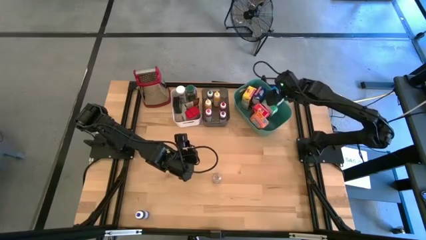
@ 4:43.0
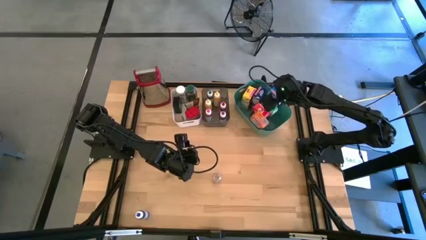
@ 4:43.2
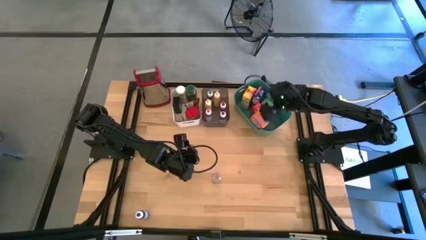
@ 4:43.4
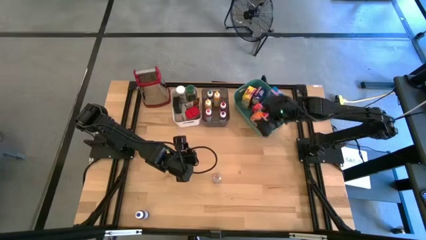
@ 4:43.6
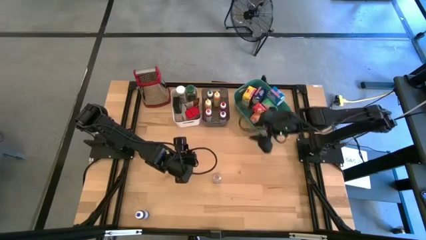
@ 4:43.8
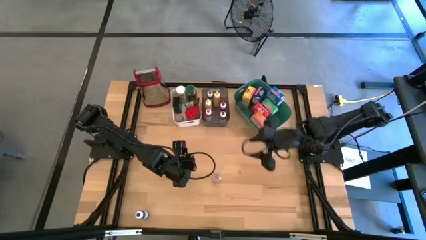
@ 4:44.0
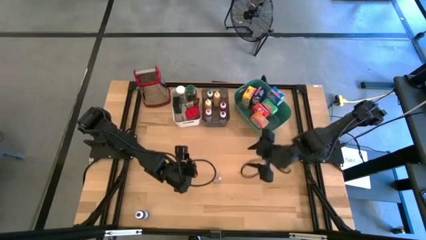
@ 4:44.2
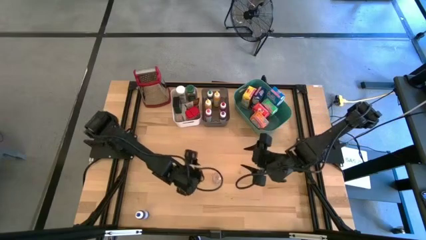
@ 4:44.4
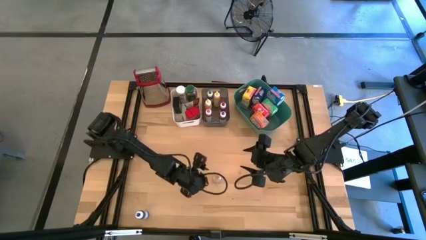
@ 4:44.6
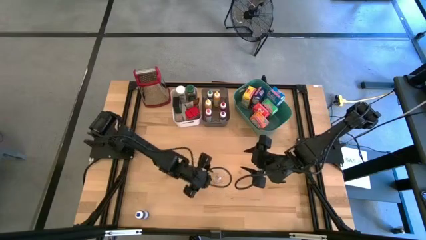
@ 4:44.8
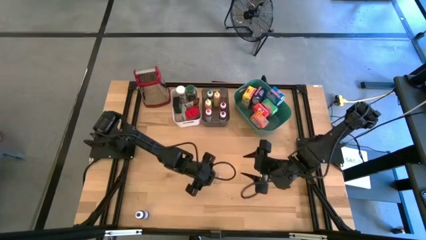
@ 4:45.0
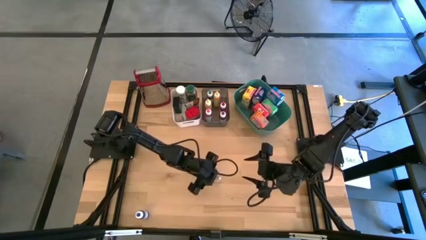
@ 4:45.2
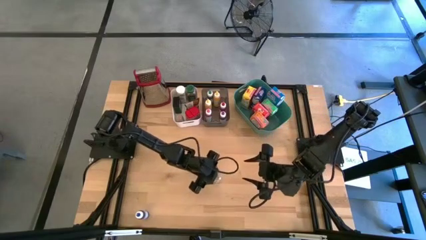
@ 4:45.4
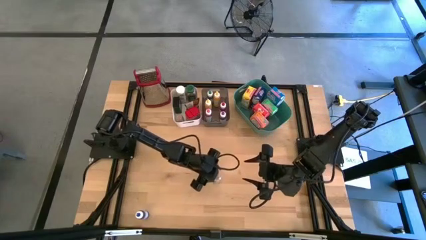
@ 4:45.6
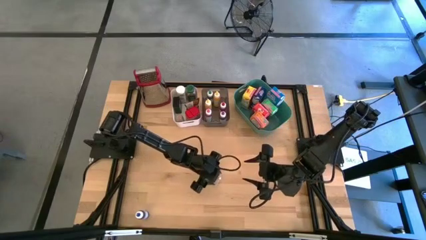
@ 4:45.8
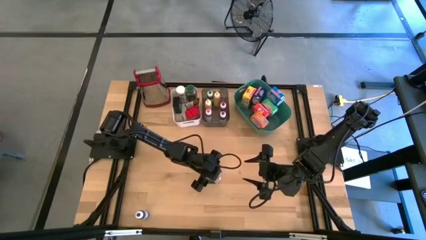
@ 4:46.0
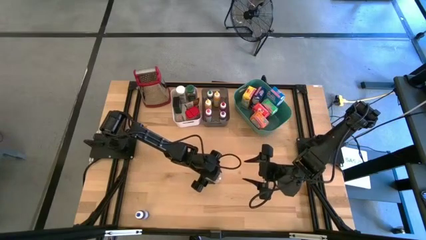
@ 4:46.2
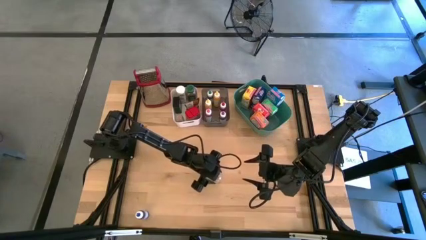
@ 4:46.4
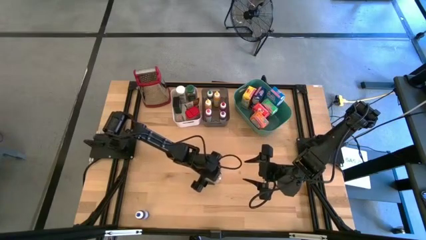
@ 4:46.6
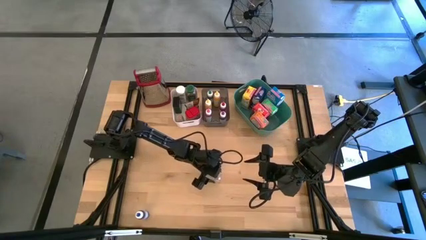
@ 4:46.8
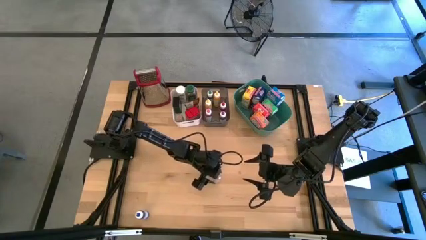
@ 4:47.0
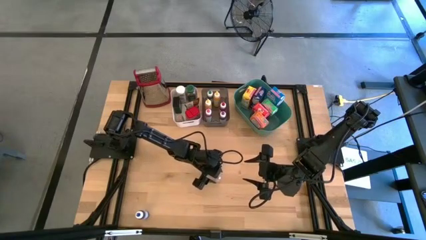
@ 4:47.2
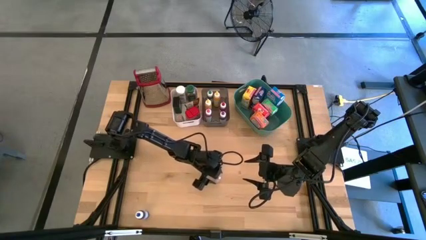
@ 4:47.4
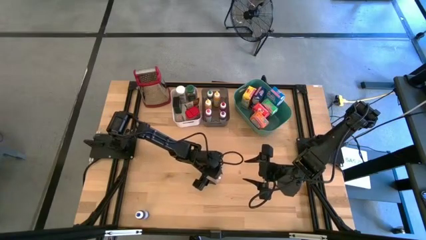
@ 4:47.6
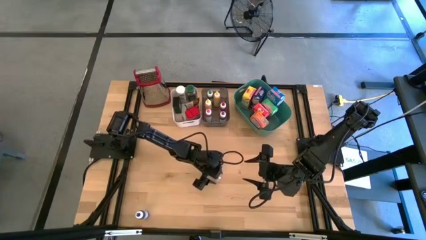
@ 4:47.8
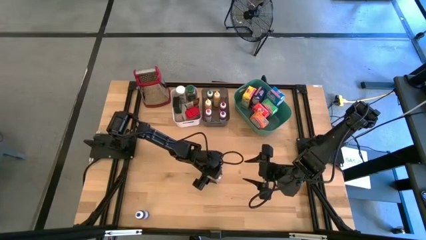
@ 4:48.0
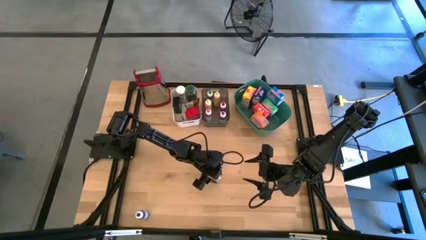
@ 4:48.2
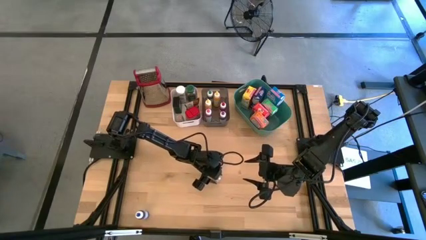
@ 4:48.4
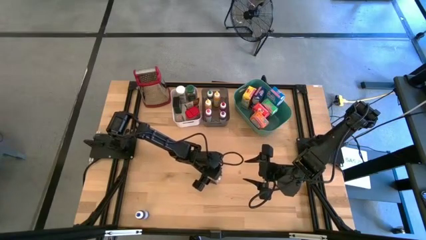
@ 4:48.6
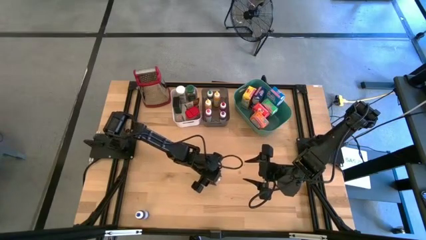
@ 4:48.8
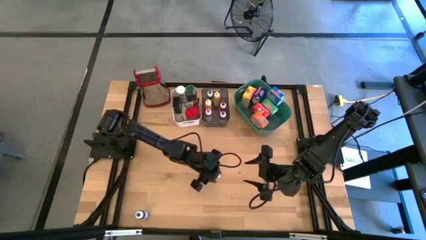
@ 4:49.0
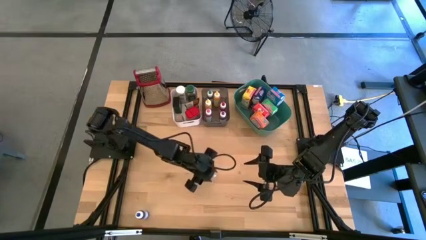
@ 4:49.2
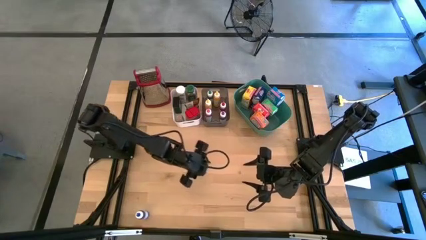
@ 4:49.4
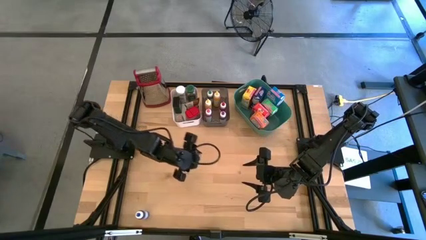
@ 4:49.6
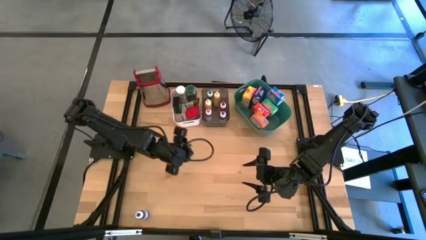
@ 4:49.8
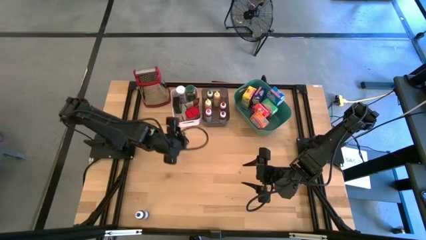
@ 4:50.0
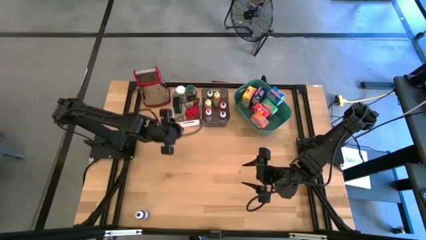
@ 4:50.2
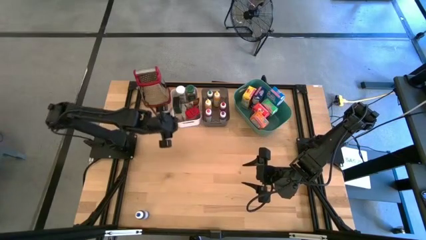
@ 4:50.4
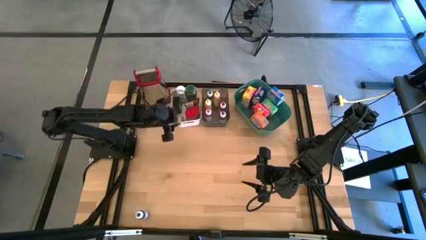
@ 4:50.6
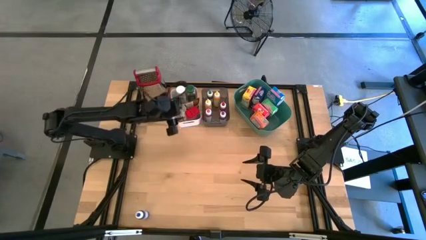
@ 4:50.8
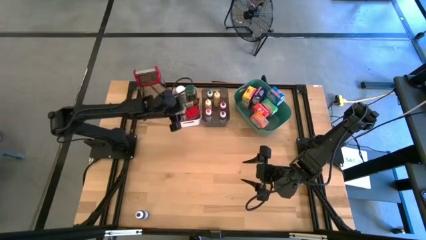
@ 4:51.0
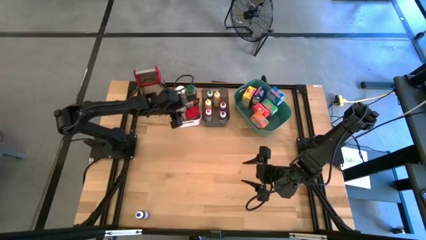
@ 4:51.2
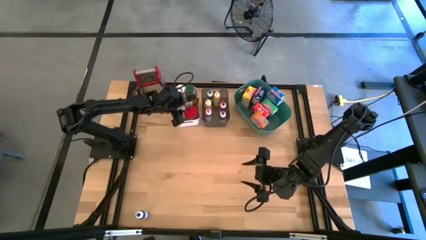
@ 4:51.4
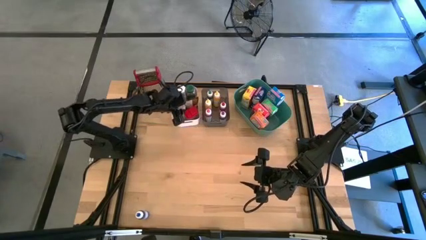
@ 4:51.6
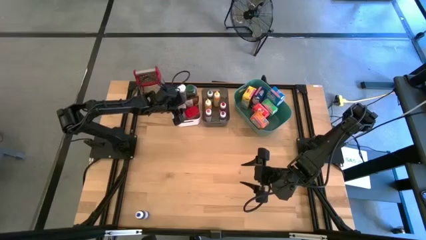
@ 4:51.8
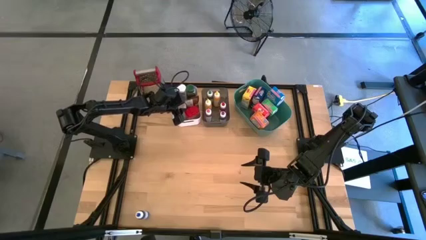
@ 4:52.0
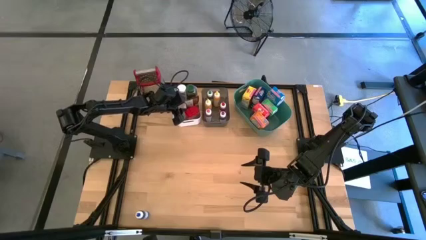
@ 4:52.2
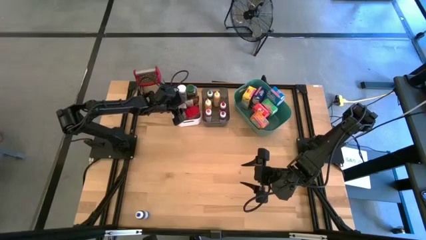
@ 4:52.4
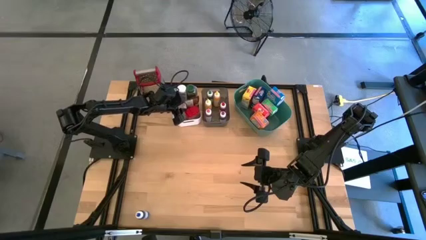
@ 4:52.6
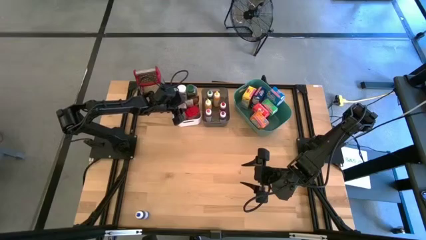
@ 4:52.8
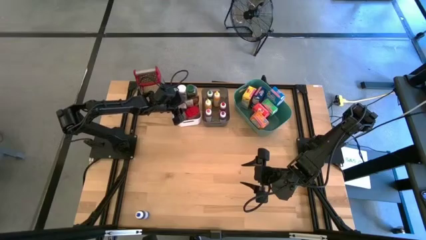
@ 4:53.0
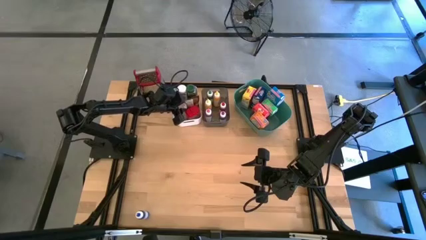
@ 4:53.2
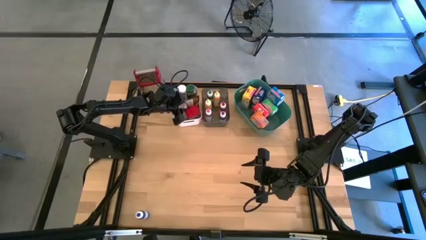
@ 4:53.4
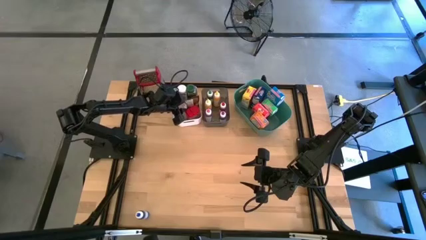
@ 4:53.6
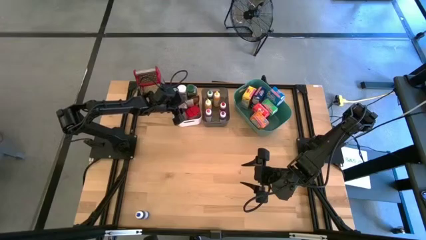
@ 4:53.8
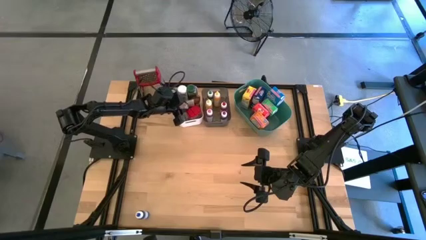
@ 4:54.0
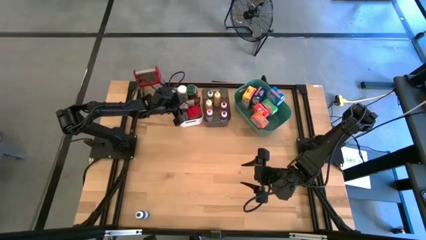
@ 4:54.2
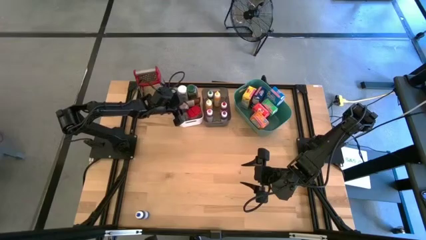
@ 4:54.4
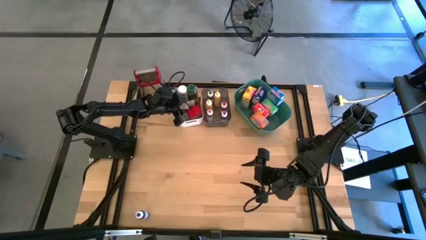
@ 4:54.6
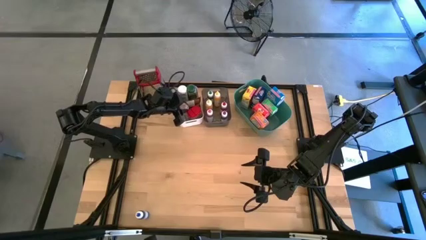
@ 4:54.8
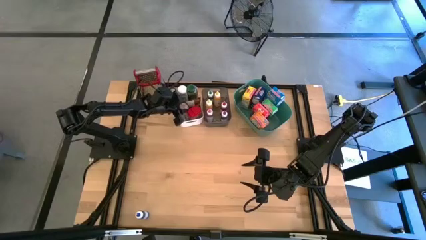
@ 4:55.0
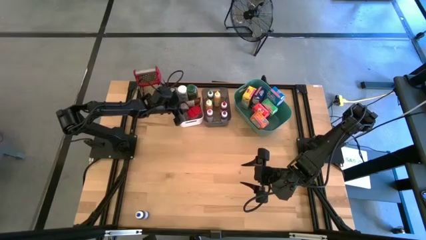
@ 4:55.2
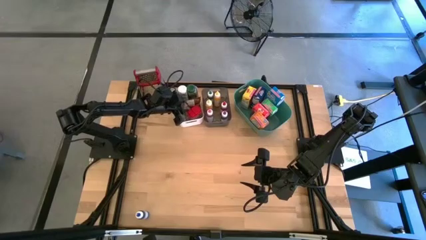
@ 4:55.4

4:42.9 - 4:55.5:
Task: Pick & Place Kitchen Items
Put the brown spice can into the left white bin

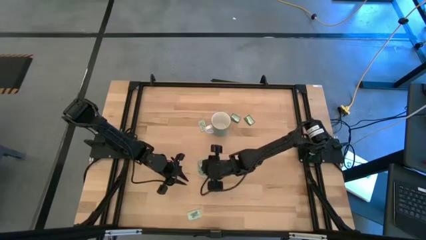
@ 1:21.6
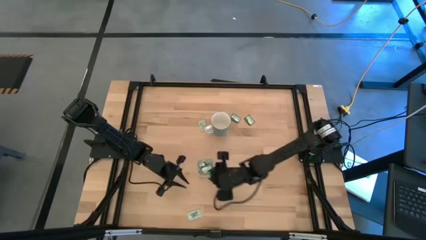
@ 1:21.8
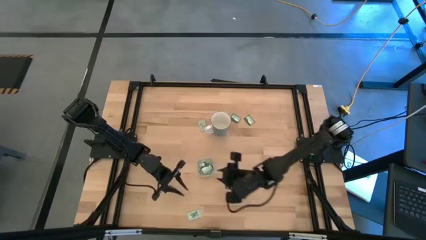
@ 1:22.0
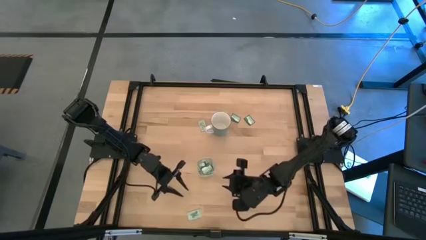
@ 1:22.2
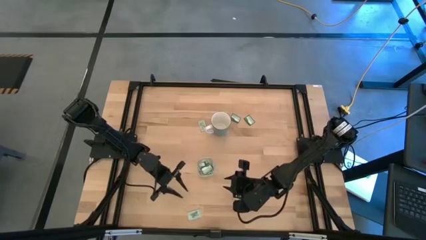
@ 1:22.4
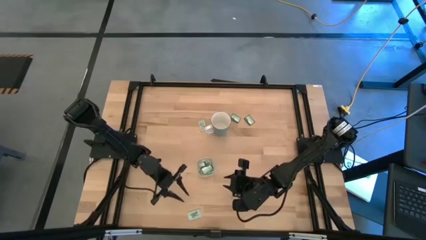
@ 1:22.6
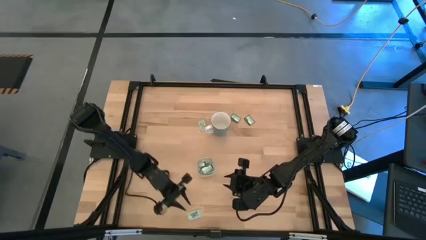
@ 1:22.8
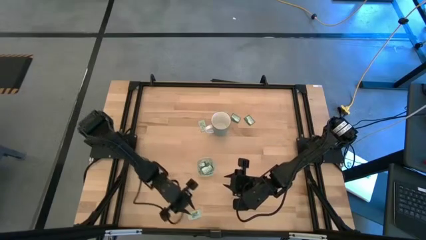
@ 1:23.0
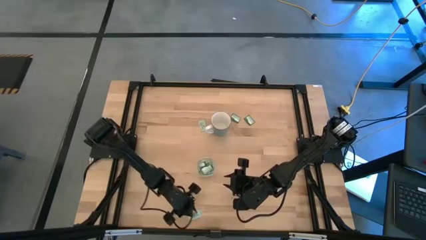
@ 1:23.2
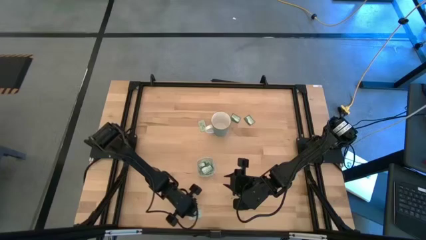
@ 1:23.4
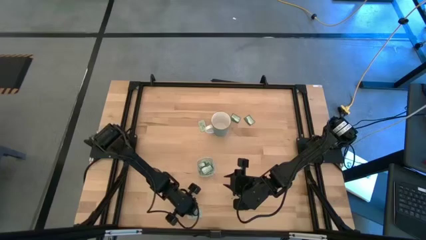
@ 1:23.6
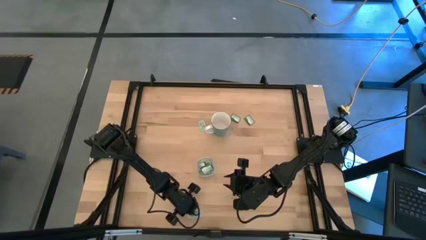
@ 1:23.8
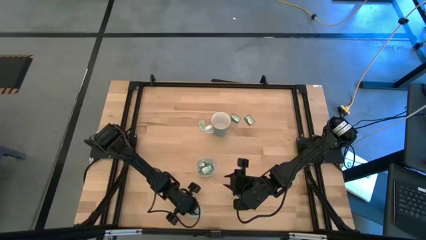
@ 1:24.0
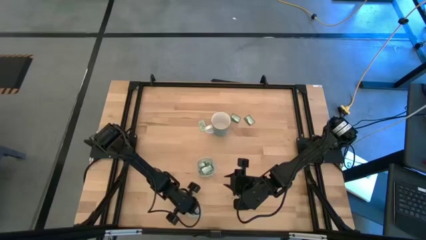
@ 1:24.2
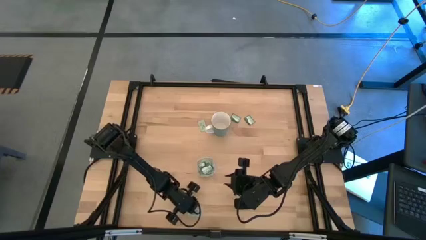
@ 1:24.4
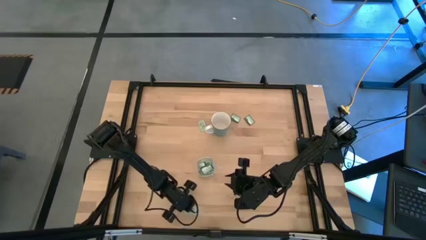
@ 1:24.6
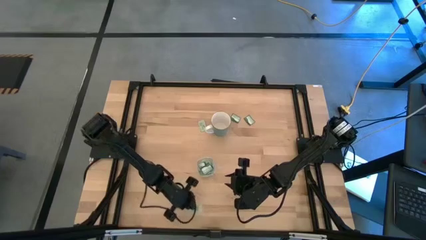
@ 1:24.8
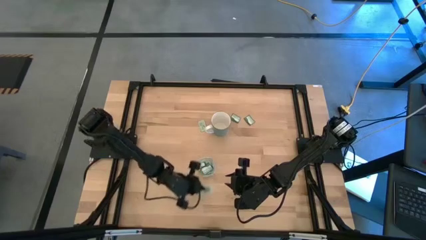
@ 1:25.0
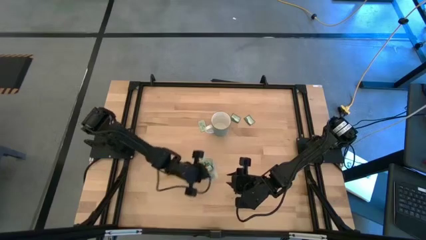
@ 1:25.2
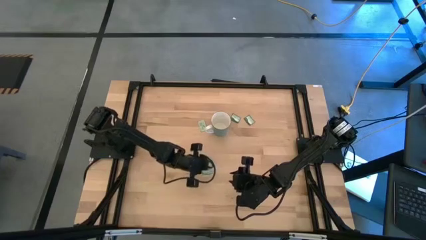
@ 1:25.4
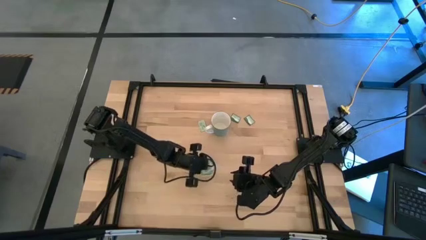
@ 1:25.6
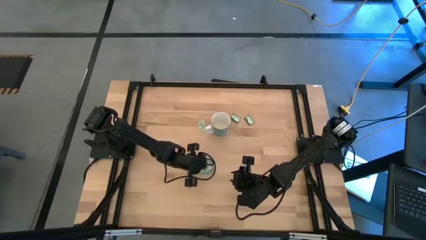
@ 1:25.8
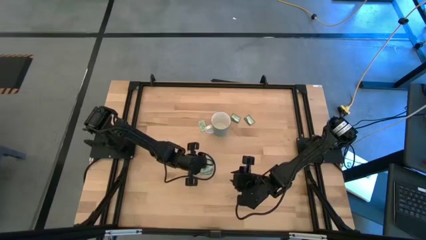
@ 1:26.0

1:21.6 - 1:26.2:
Task: Pick and place Stevia / Truvia into bins
Put the white stevia packet into the transparent bin
